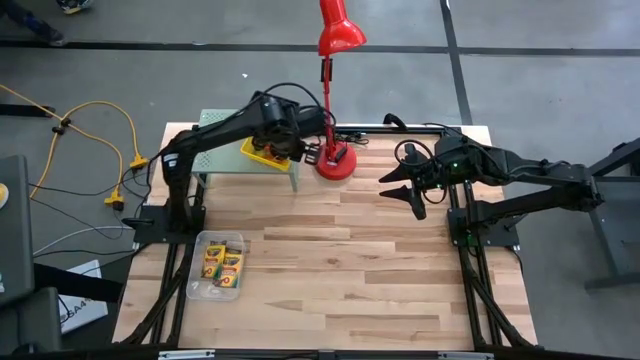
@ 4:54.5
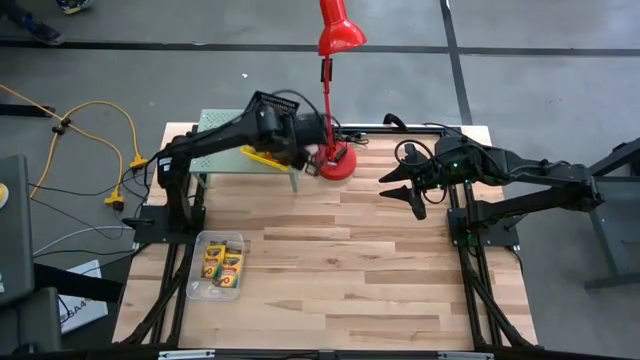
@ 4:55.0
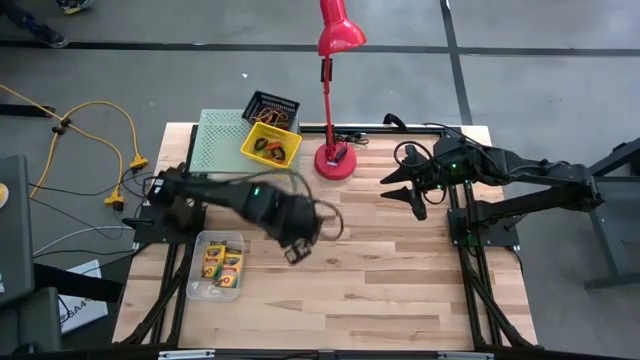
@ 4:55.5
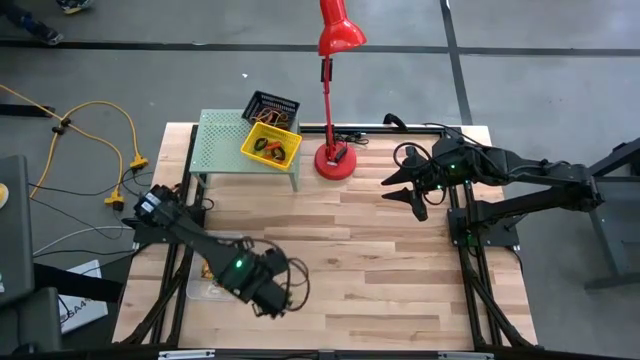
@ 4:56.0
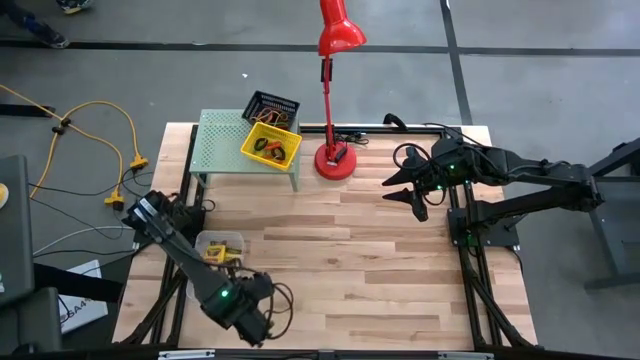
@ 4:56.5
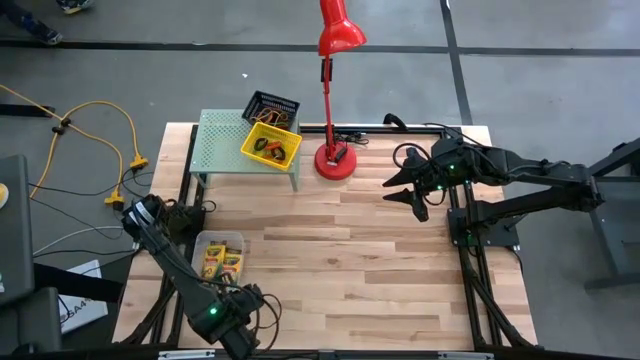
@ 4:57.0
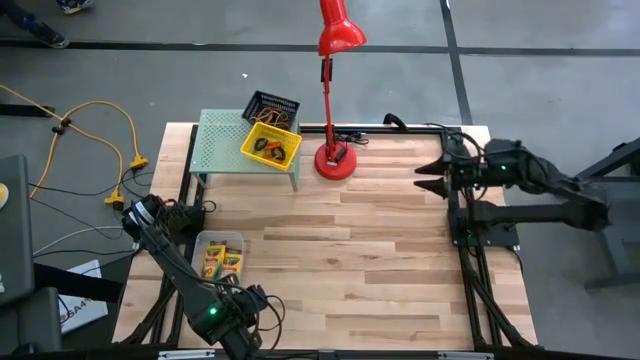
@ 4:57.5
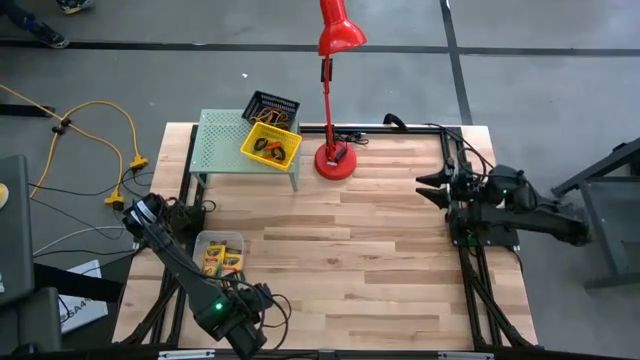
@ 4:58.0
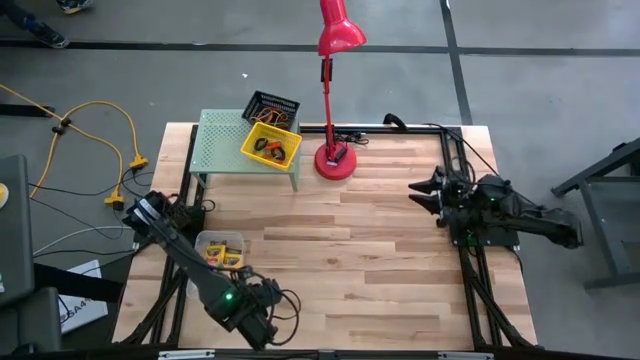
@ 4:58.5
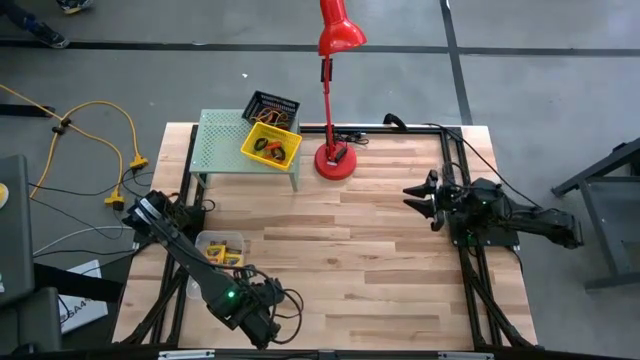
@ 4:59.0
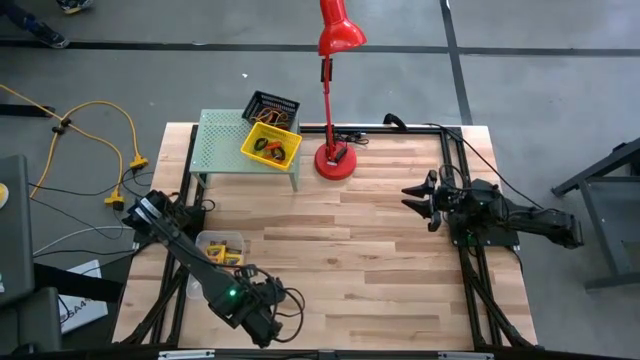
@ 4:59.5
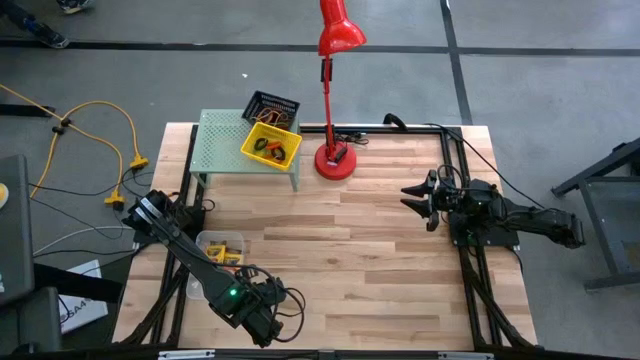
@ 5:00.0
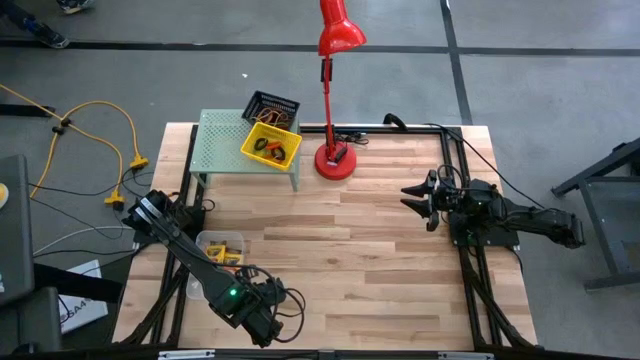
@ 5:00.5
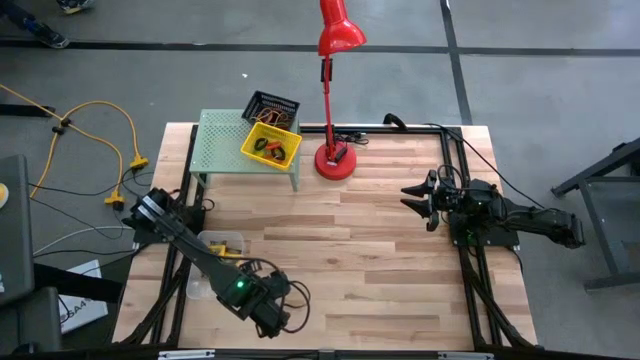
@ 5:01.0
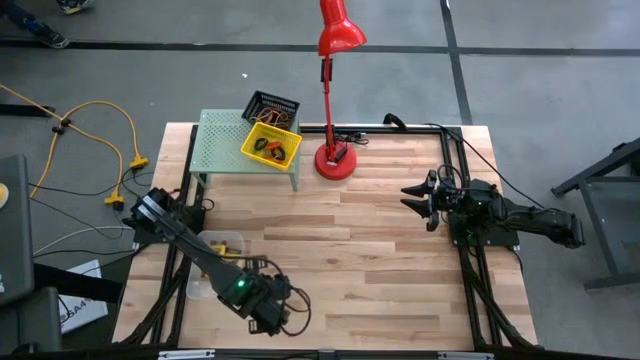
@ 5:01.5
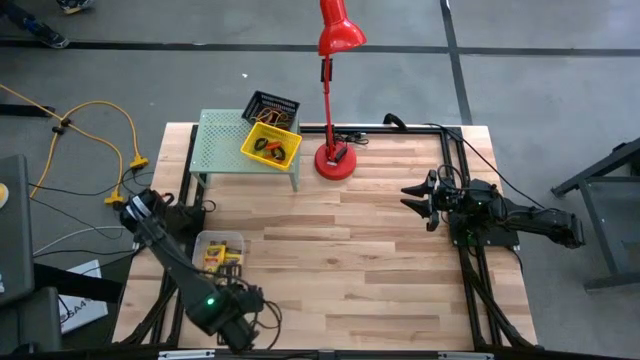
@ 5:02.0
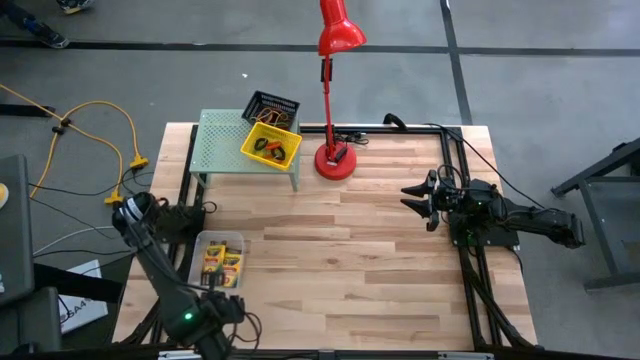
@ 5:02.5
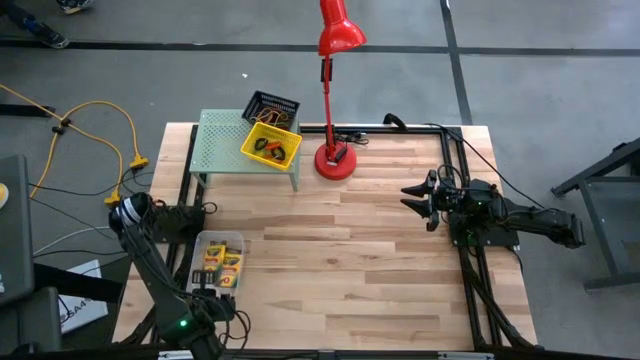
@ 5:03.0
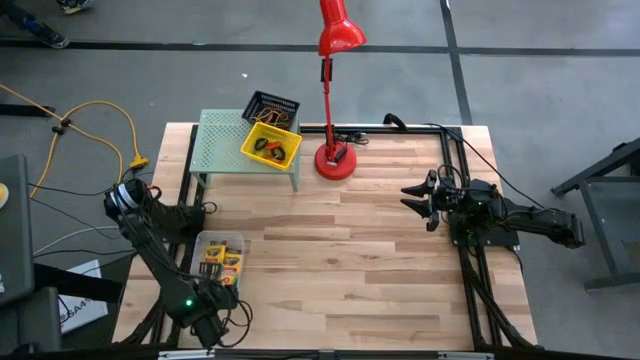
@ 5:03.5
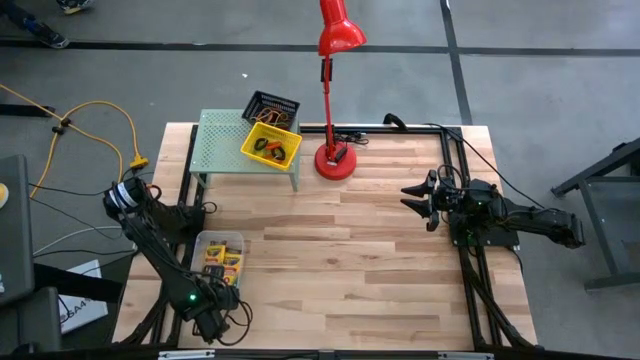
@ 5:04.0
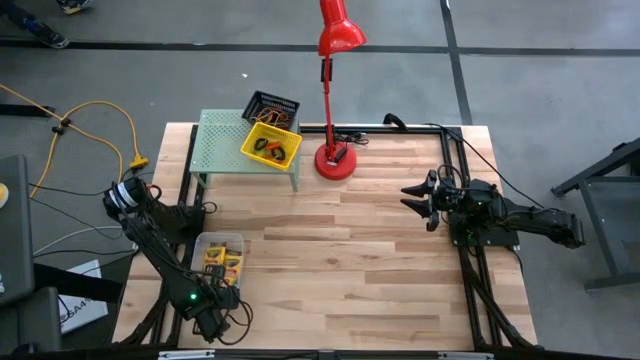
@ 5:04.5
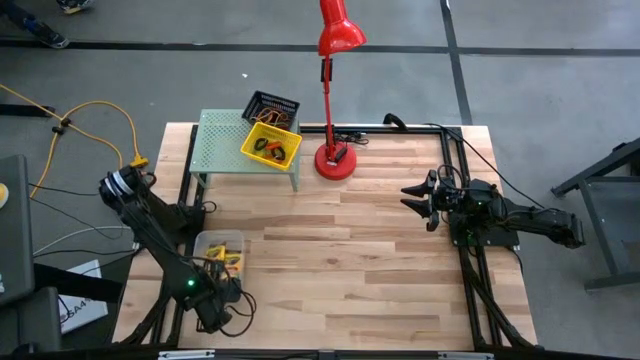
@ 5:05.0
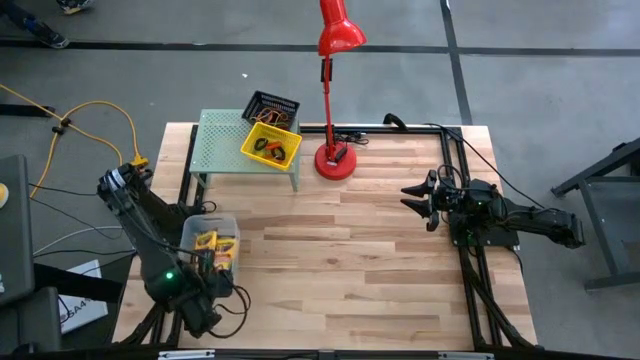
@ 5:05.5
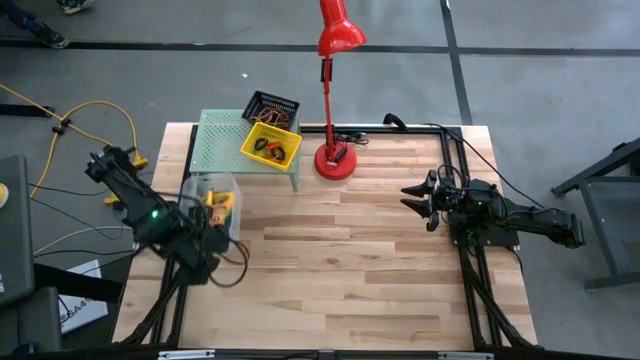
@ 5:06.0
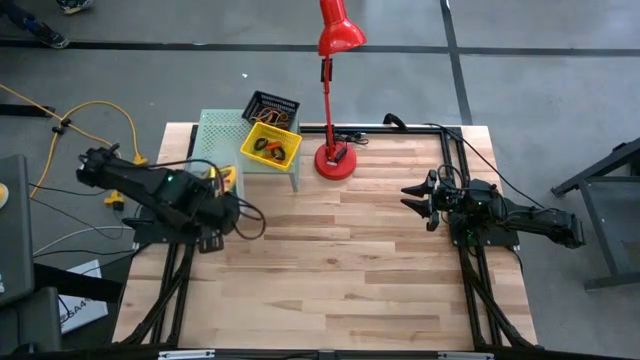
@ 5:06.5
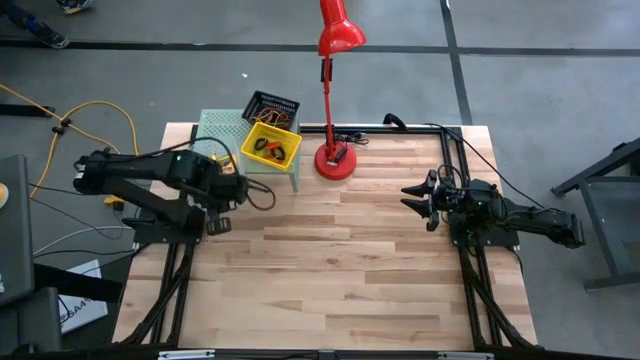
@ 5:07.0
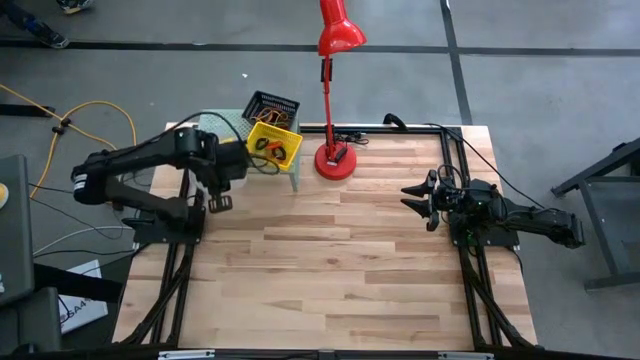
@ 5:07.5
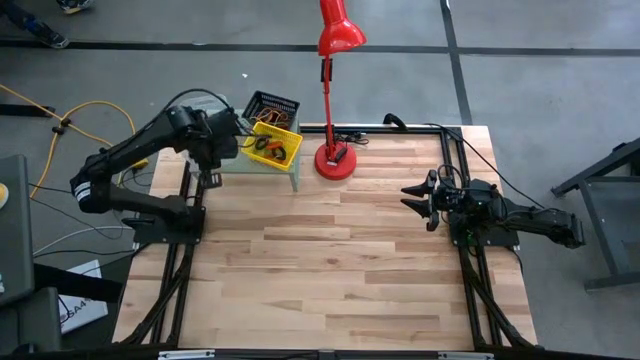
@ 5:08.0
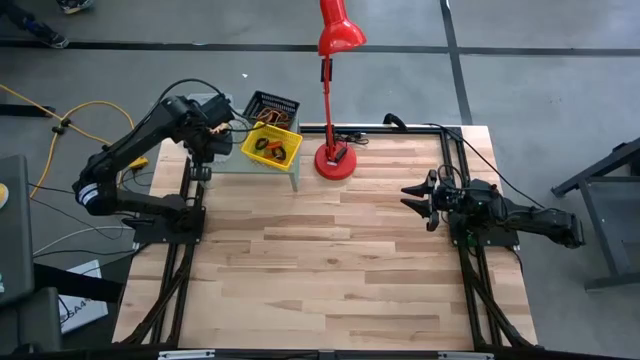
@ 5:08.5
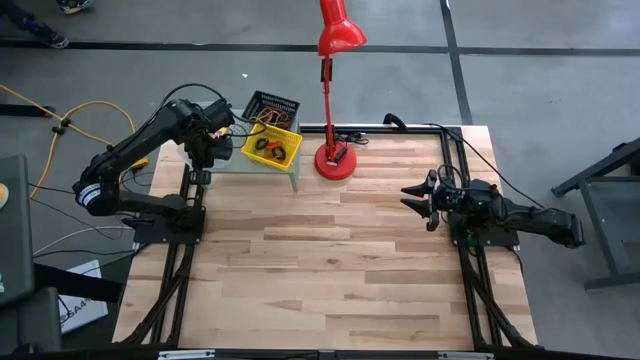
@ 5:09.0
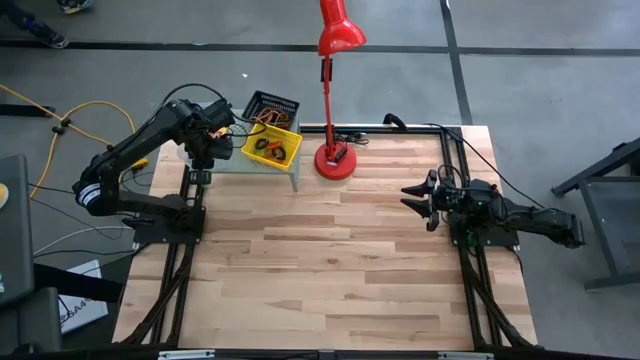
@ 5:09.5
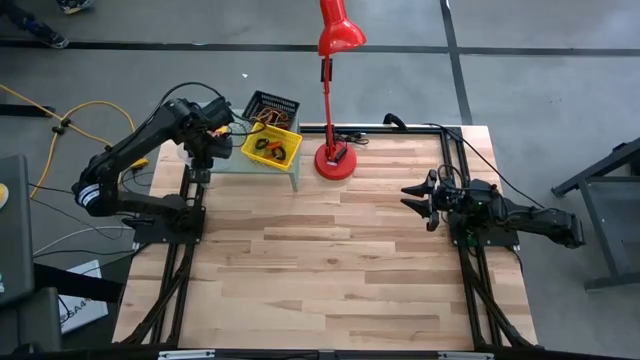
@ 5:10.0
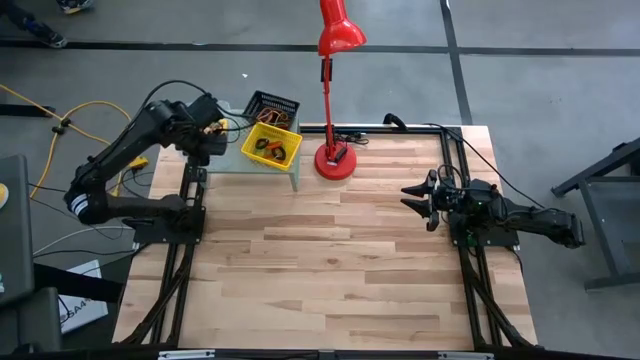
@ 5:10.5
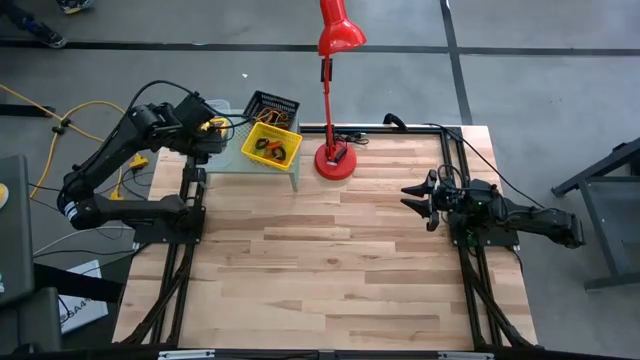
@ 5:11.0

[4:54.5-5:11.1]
Task: Pick & Place Office Desk Supplies
Put the transparent bin with crayon boxes on the shelf

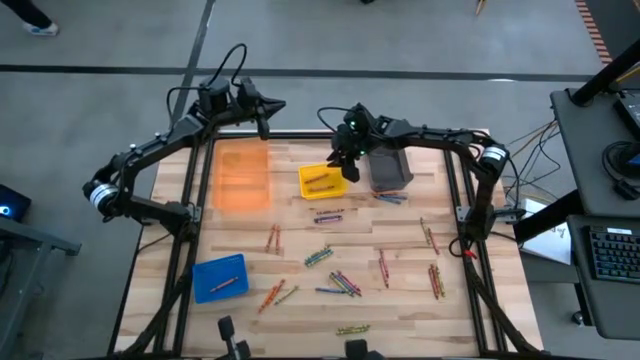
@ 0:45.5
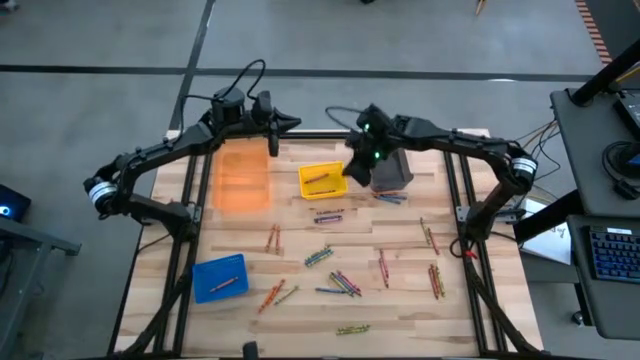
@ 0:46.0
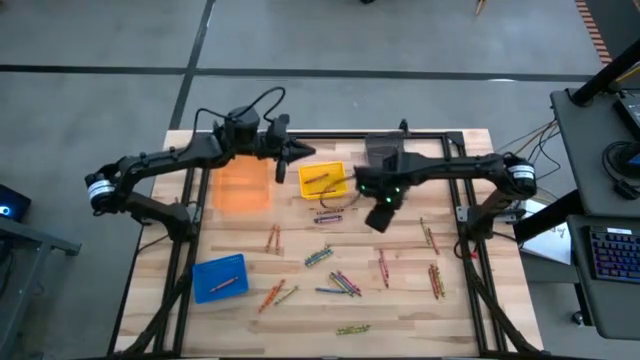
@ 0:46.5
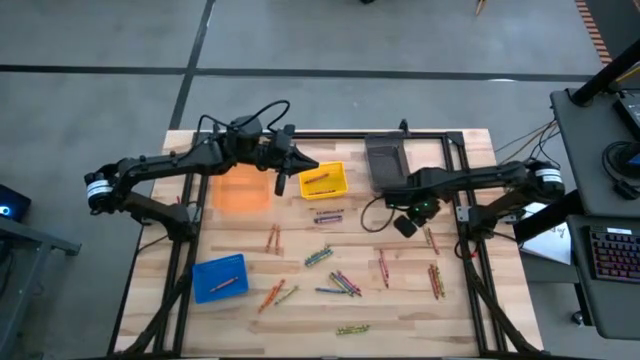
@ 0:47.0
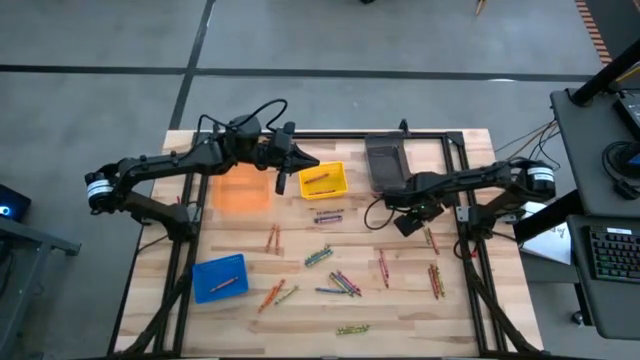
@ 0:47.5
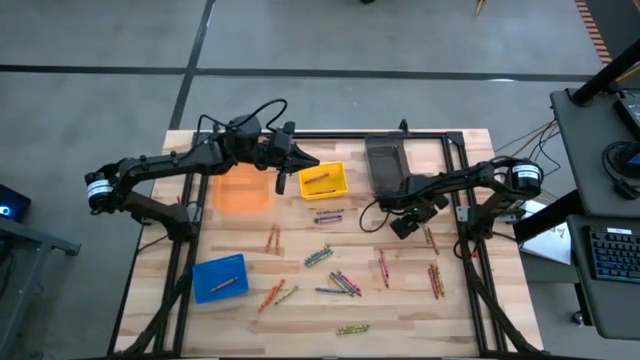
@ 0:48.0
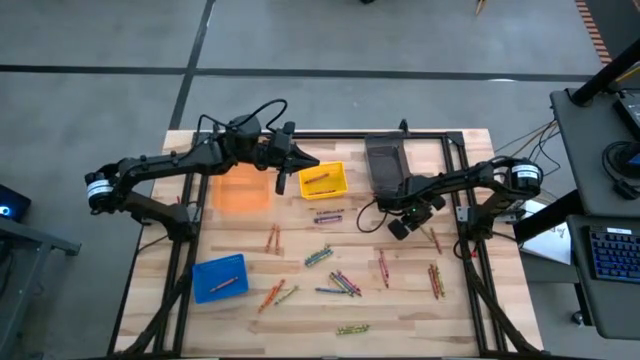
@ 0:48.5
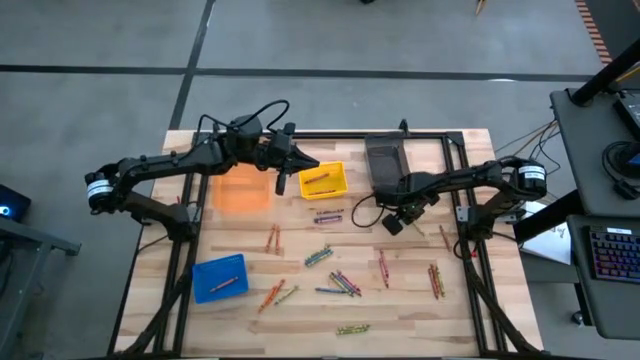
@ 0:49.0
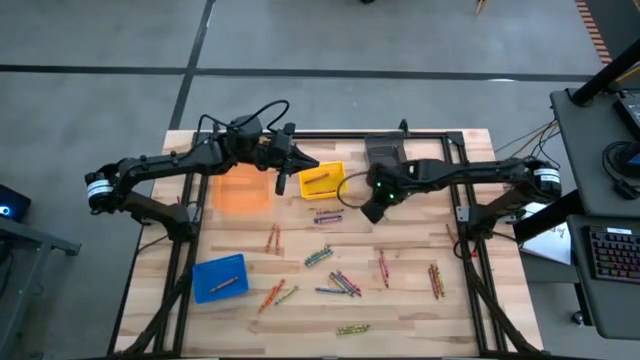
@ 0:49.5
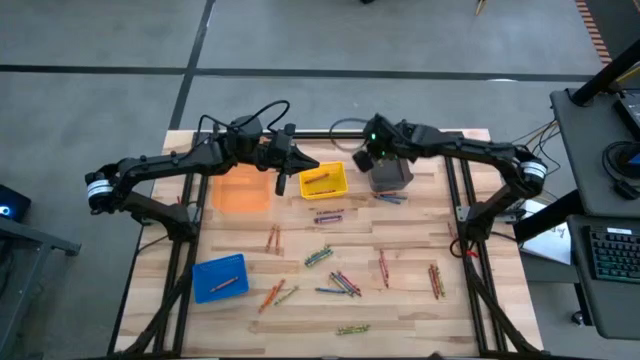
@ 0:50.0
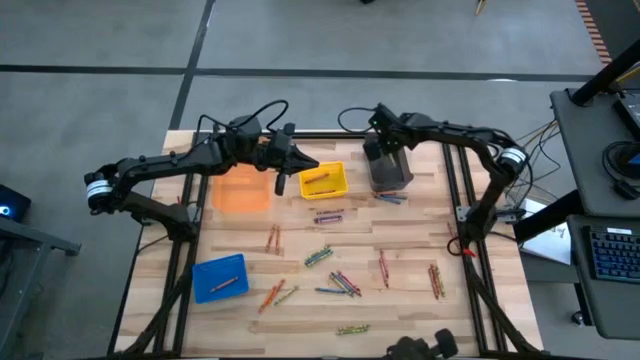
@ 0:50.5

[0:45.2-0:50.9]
Task: Sort crayons
Put the green crayon into the black bin
